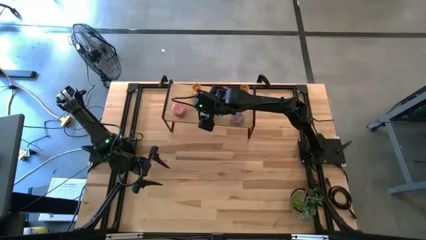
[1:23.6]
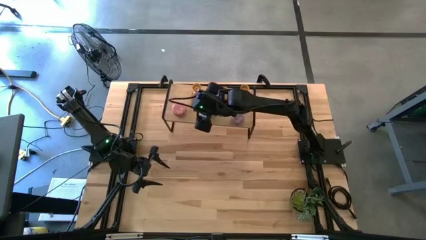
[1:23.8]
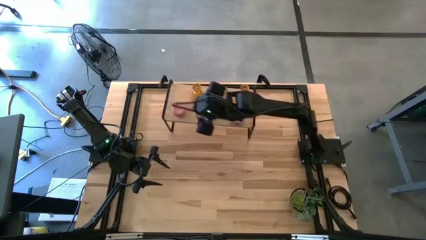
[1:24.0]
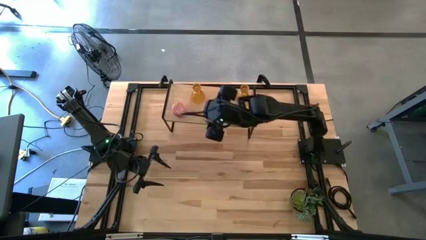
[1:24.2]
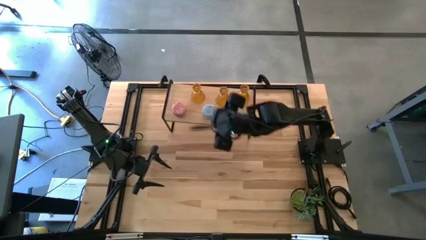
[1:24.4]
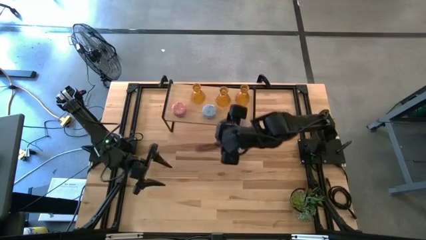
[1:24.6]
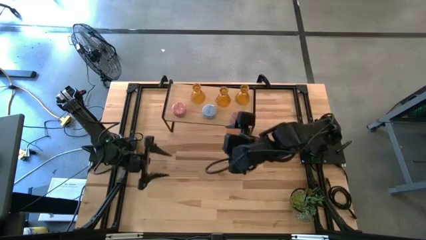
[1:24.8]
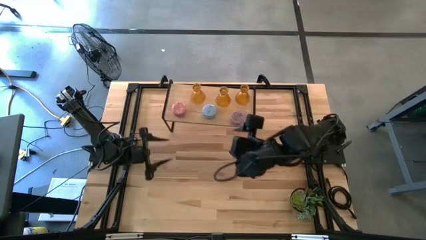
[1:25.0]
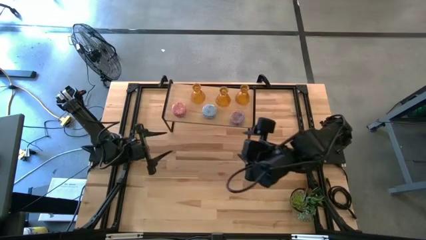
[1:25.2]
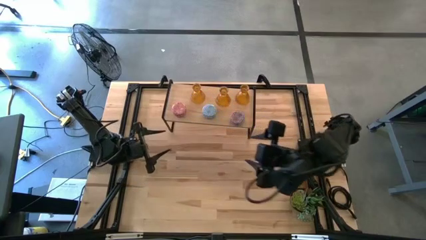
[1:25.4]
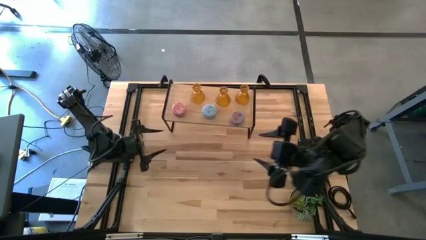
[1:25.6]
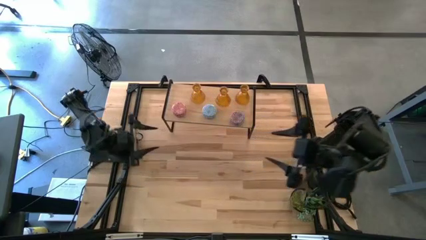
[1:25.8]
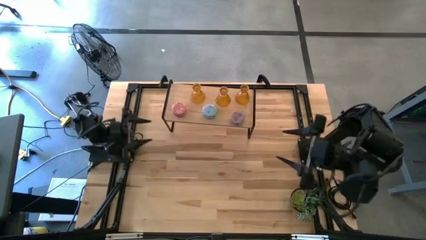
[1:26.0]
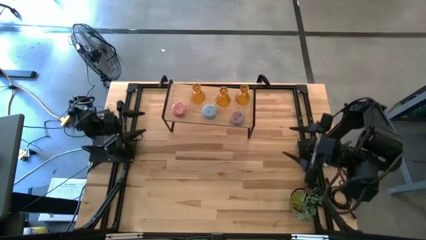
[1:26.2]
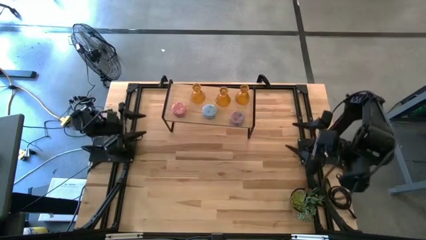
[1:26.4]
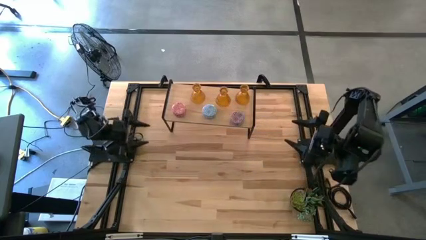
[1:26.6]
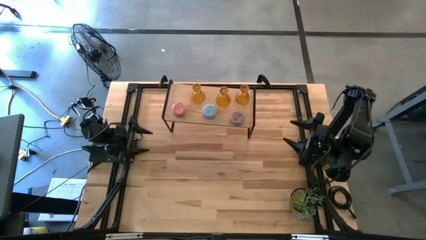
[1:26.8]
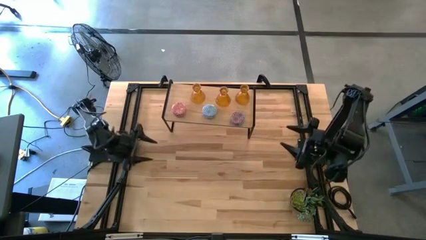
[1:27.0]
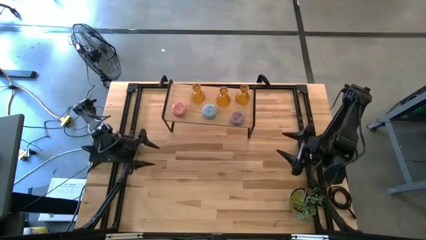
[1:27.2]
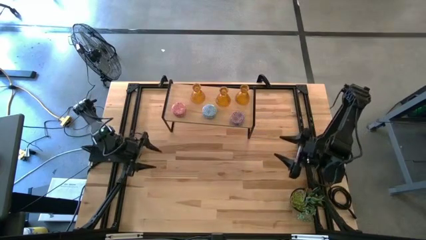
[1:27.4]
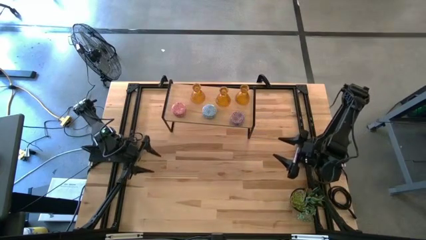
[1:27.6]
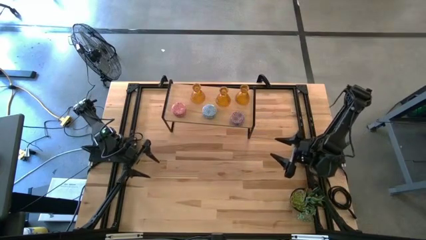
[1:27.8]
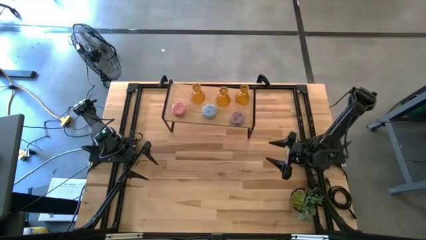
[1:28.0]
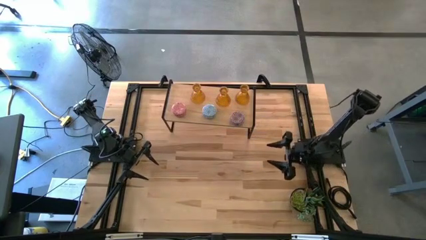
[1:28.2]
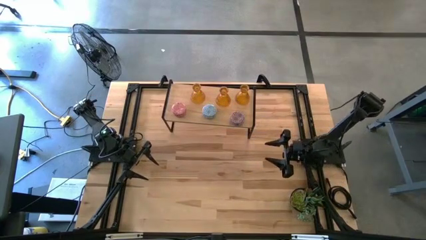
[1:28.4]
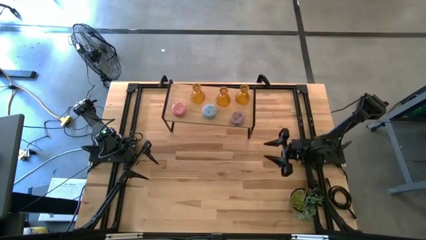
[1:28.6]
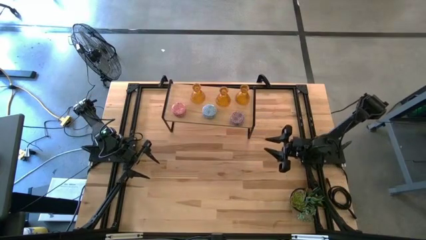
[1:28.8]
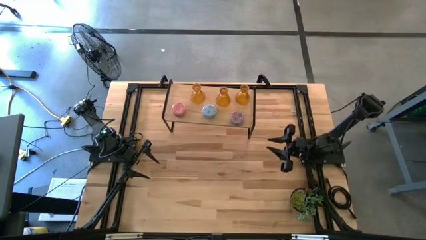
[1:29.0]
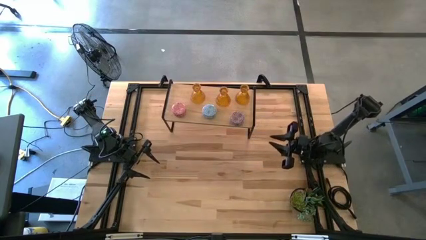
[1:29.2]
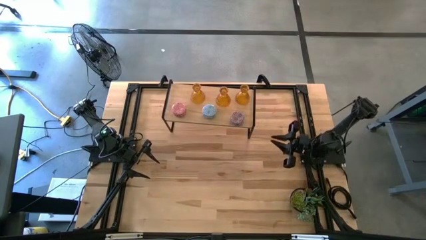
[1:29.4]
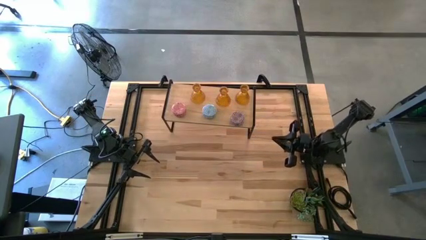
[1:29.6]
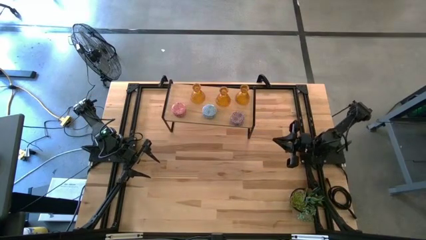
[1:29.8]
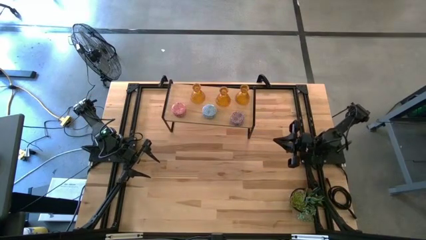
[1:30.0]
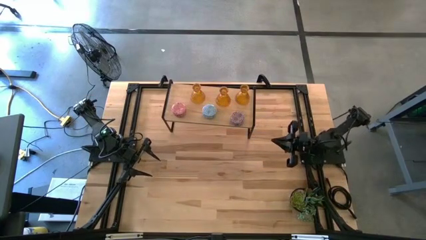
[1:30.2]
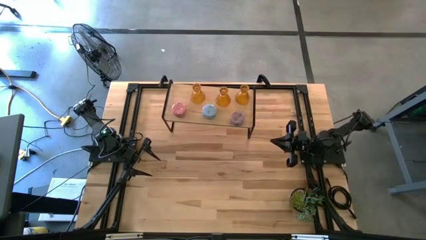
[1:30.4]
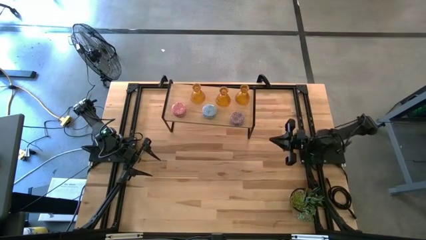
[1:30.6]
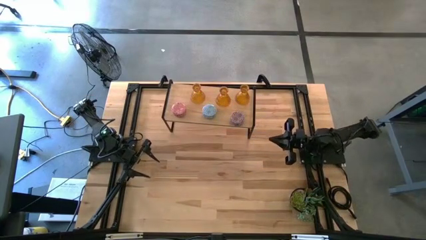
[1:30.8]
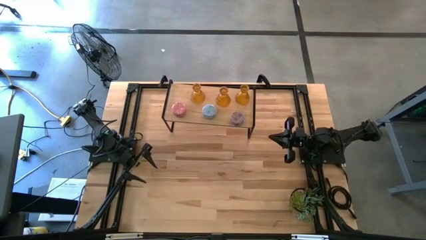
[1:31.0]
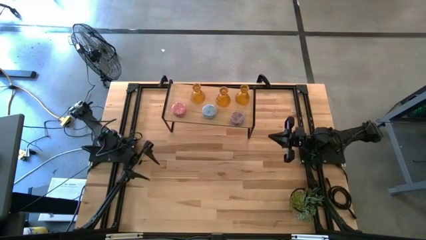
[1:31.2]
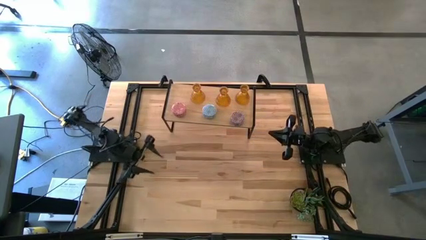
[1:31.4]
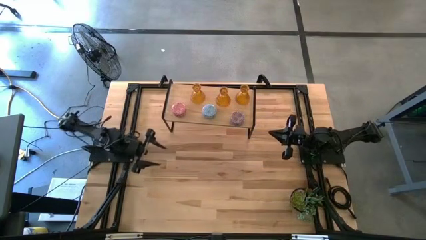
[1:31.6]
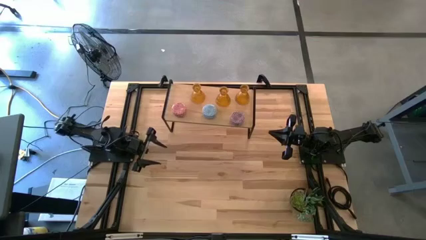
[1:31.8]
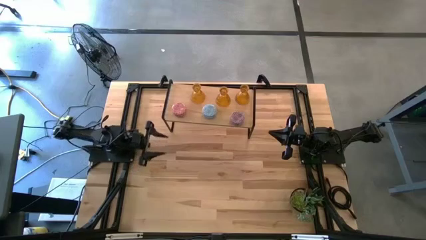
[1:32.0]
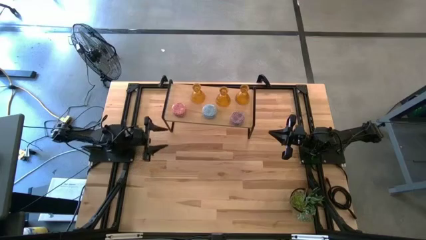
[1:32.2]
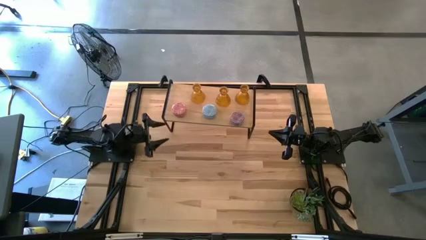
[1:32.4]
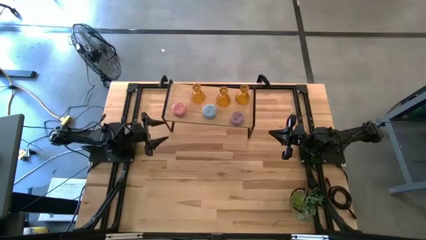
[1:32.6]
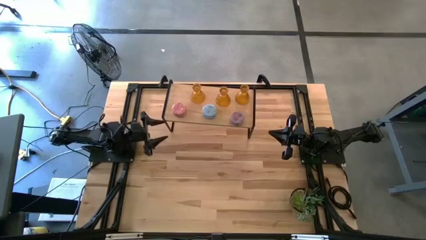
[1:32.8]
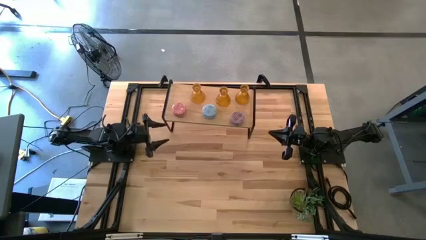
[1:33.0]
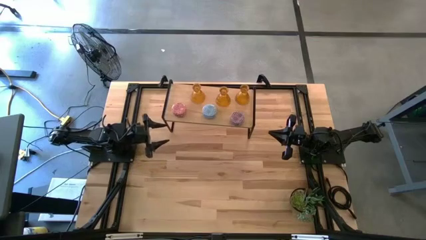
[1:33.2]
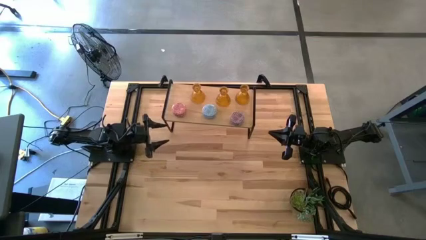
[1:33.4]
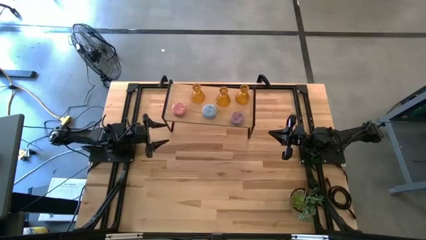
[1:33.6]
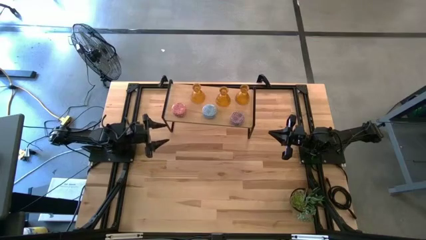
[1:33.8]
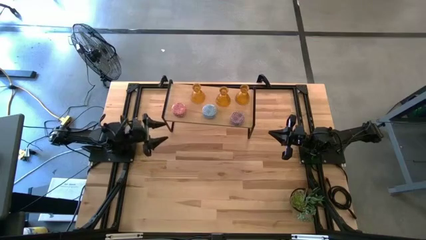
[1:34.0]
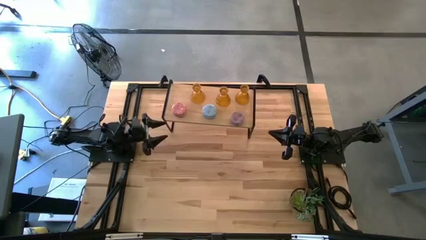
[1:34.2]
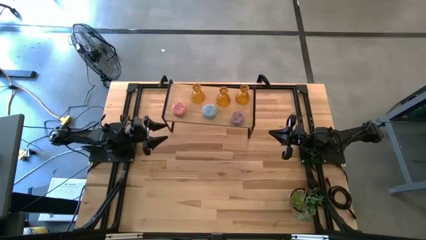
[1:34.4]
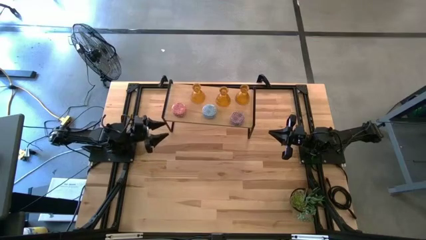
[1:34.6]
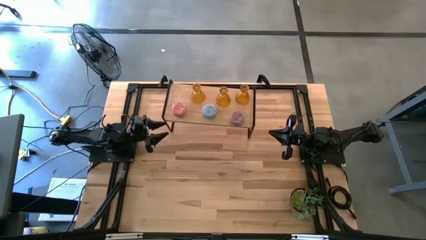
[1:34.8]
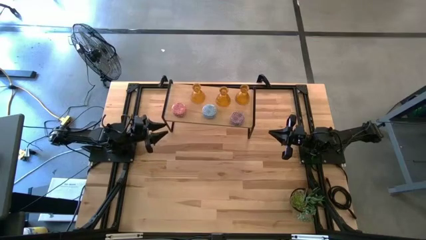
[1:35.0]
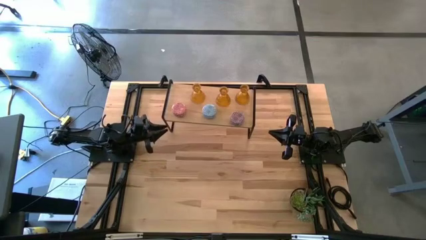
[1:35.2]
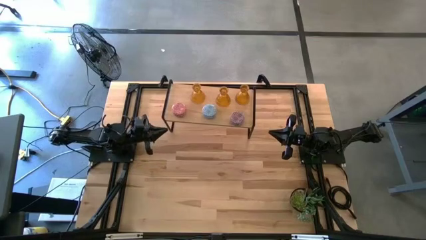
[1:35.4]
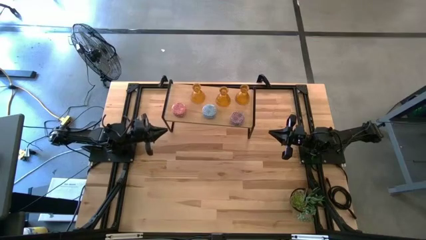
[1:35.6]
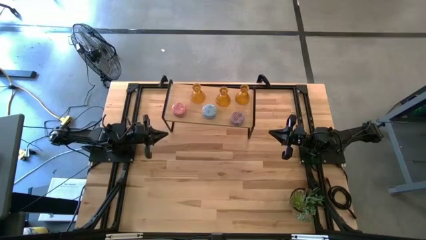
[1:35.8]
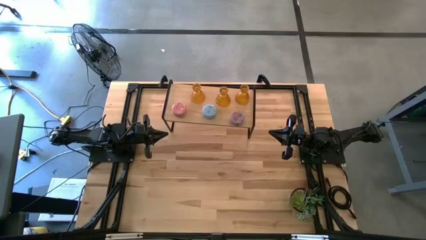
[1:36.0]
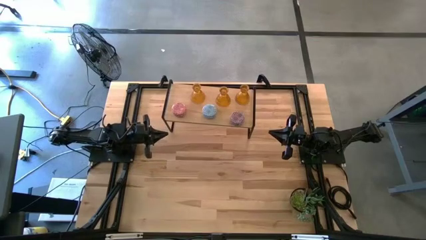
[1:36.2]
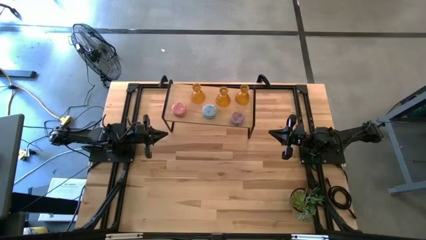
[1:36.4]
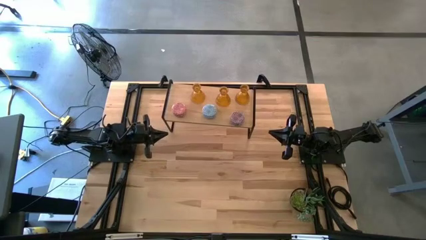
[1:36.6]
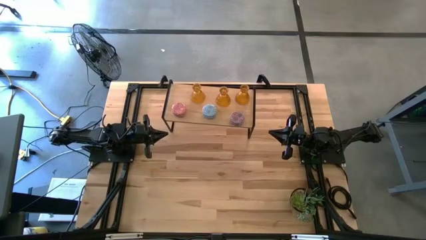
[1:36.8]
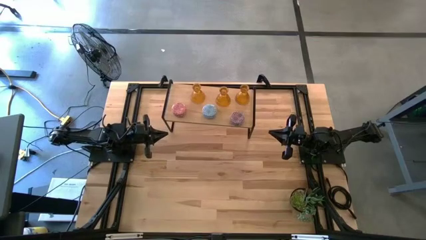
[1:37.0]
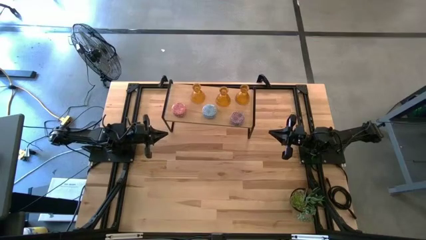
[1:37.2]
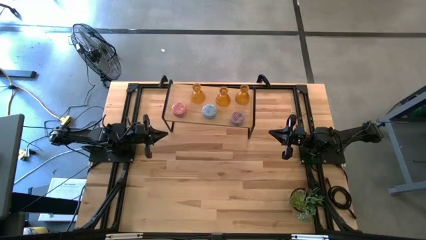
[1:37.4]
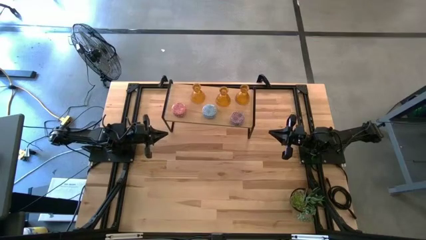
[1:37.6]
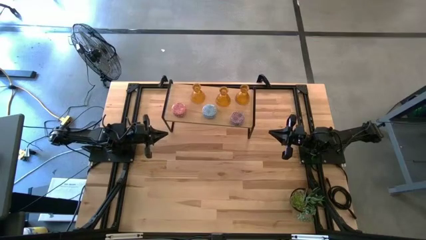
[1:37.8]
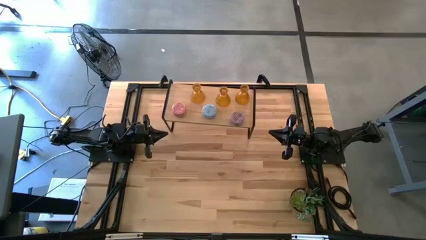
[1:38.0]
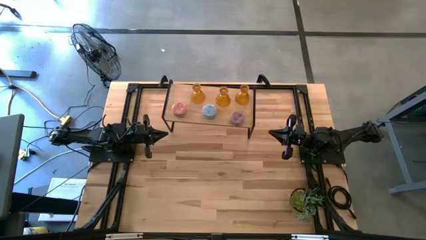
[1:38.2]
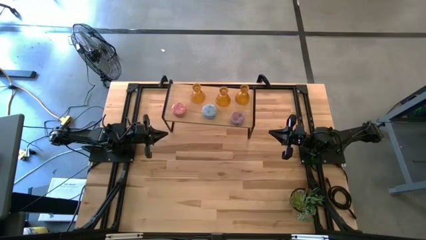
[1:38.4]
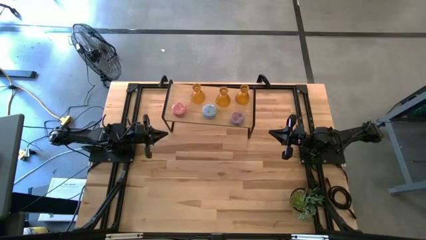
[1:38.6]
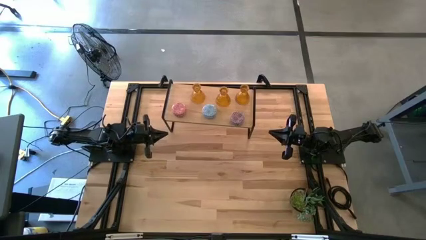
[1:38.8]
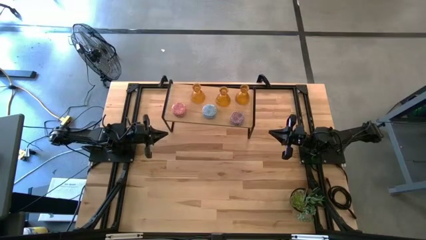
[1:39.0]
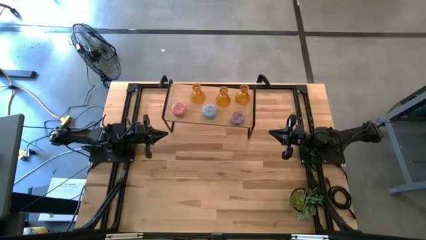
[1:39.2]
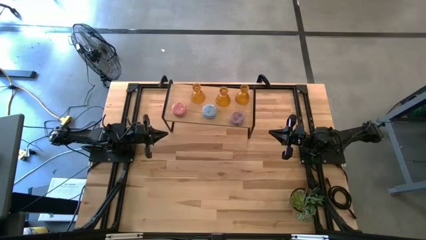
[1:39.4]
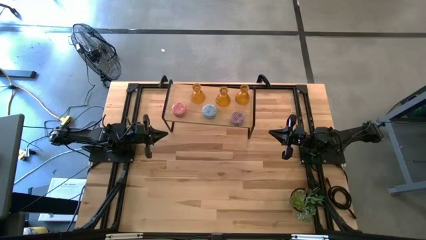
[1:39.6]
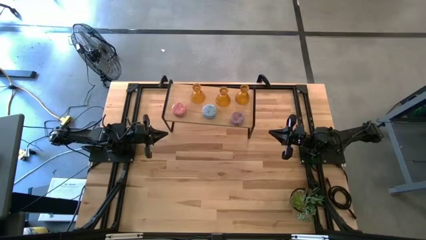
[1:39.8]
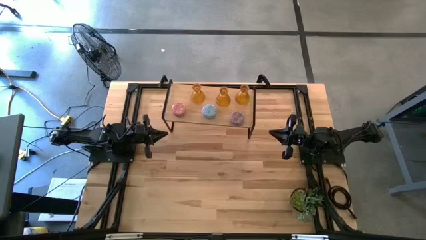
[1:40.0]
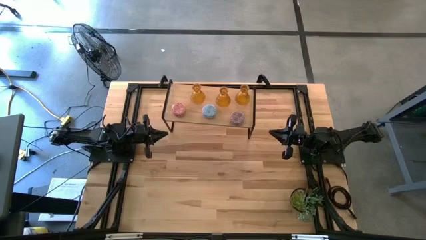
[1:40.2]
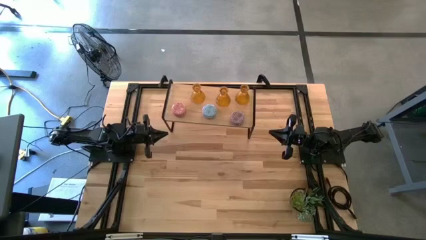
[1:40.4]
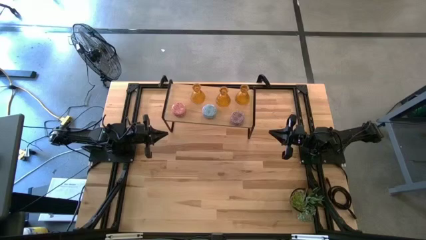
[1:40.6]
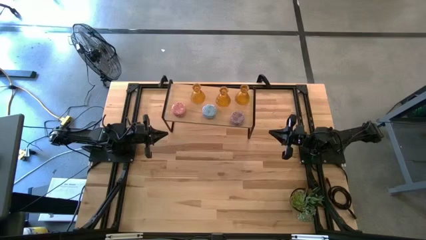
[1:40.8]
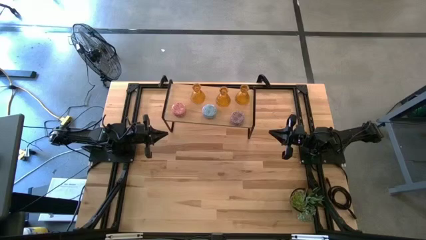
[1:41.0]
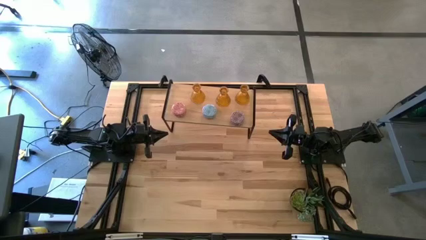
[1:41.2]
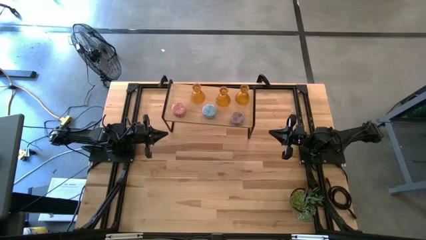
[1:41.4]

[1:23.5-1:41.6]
Task: Pick & Place candle stick holders
Return to Home Position
